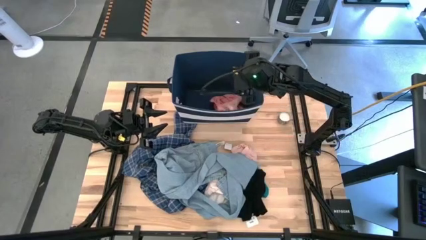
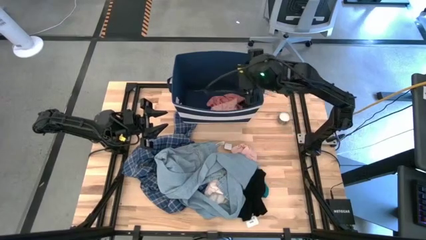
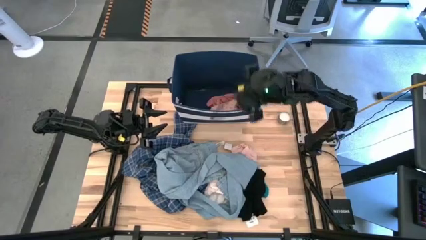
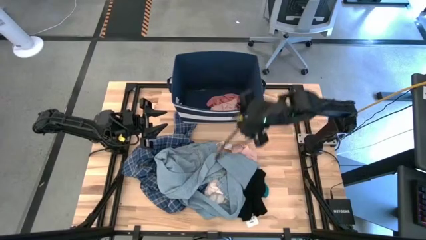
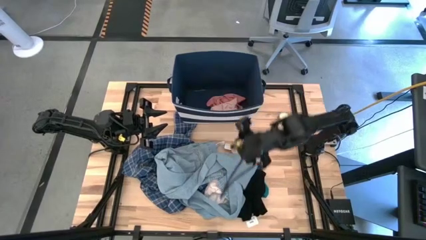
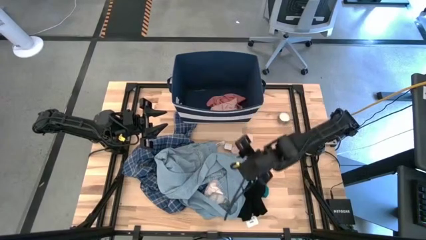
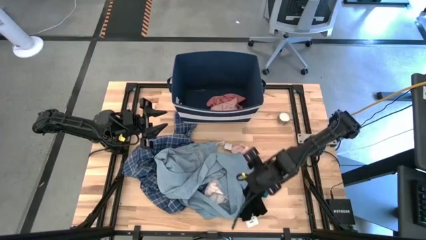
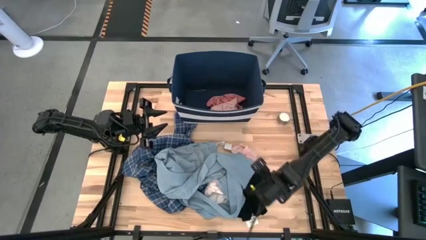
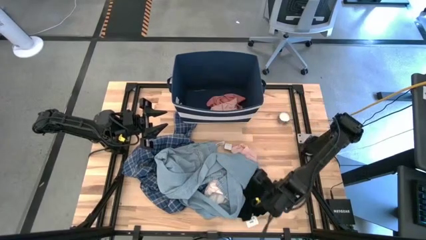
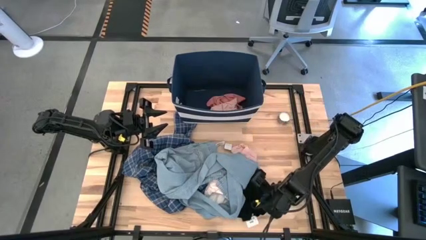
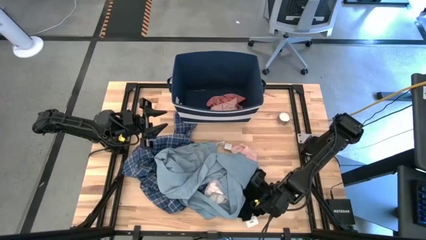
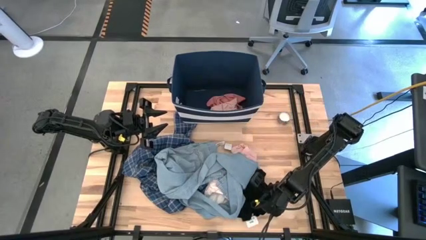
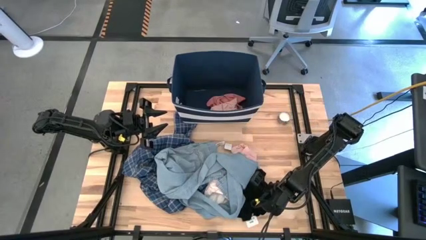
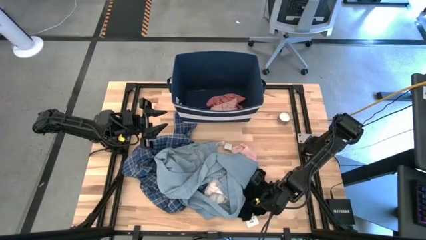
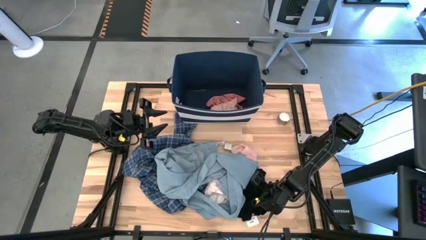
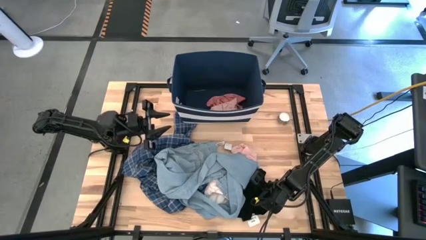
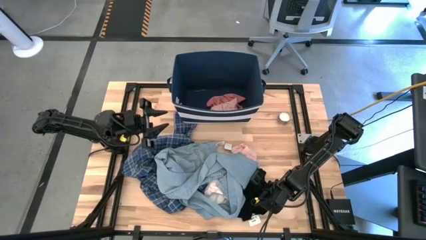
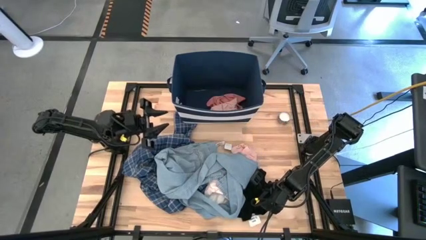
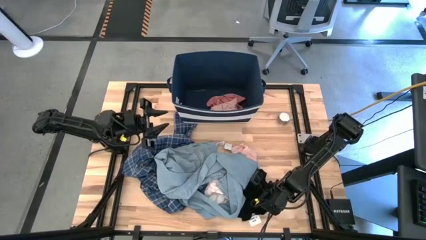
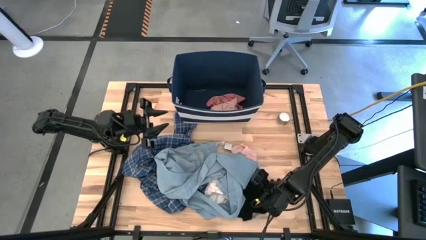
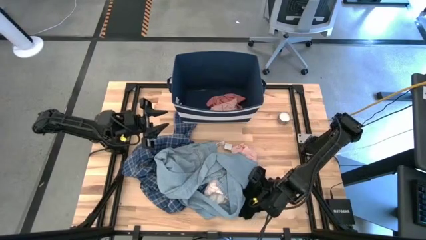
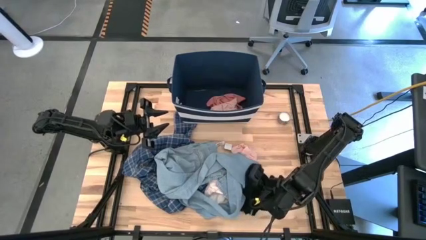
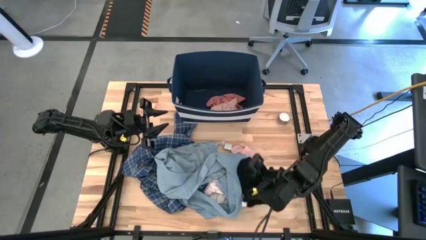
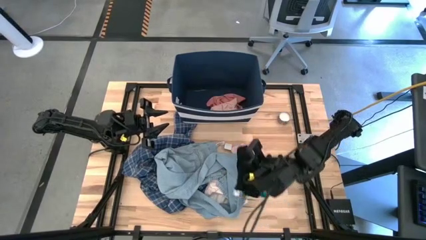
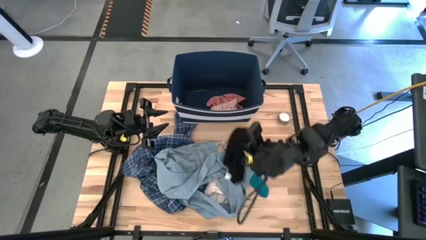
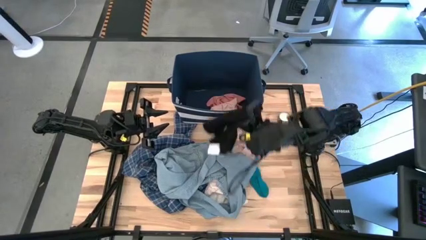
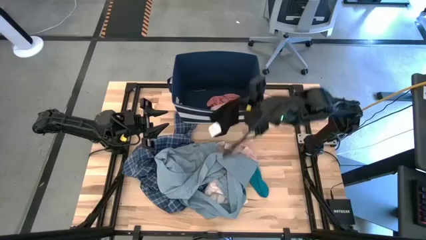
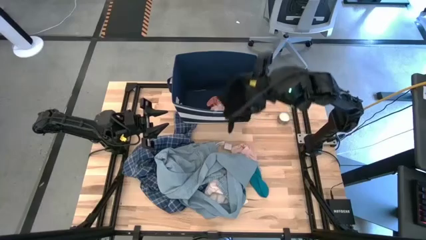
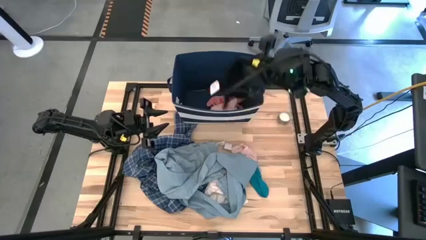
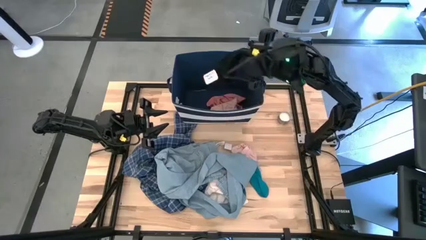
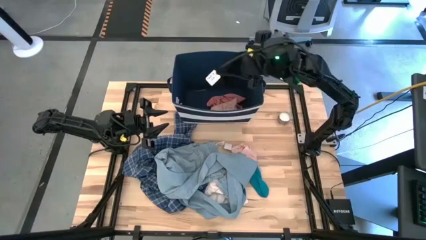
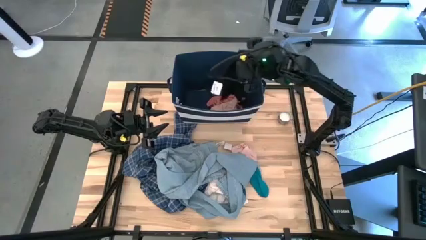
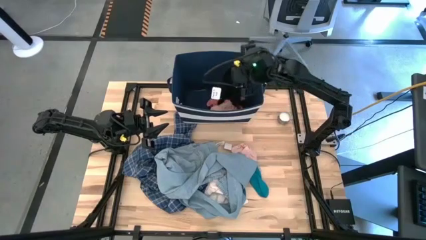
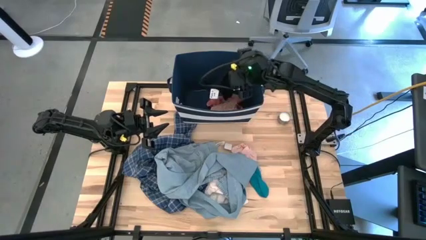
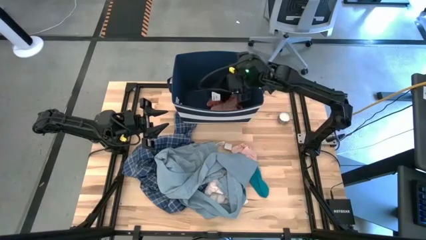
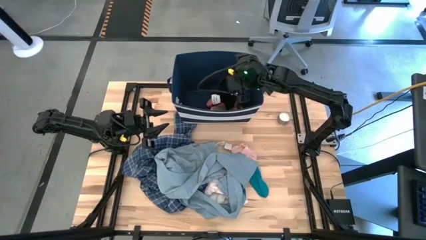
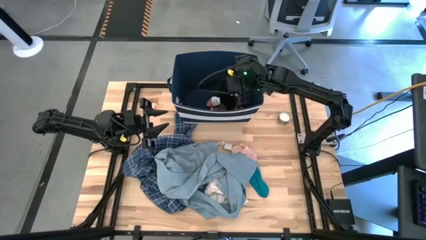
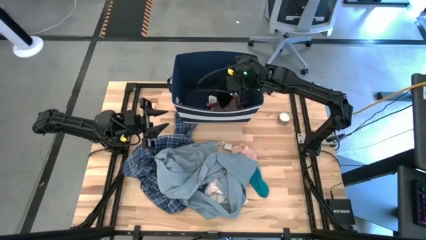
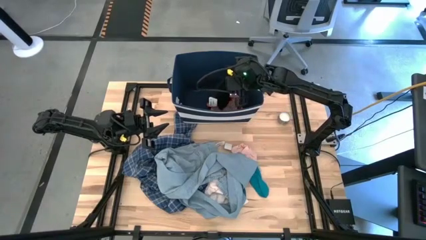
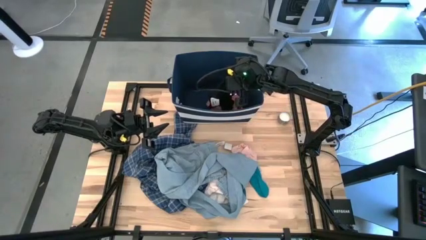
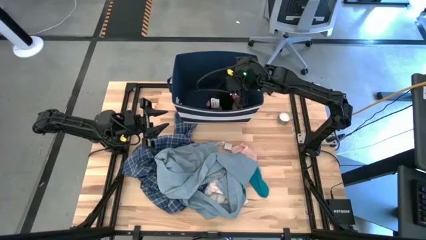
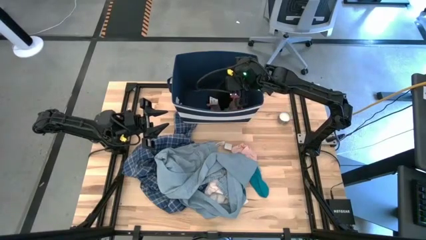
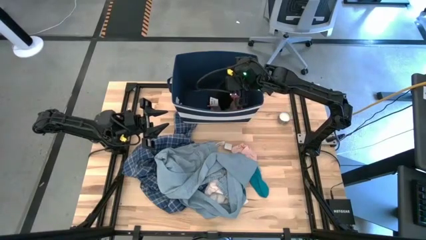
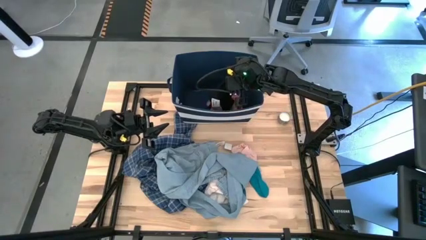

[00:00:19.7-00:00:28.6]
Task: Sort clothes
Put the black boxer into the blue laundry bin

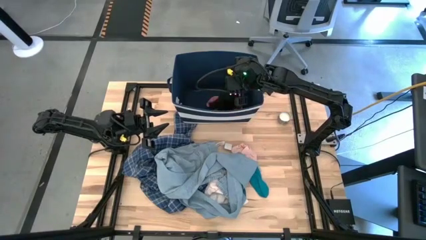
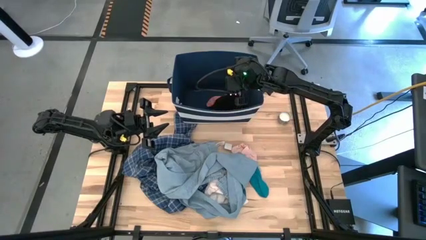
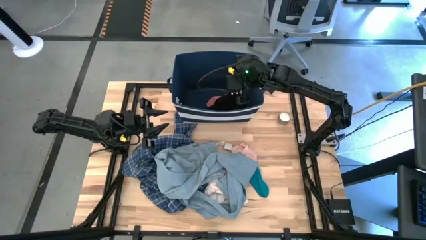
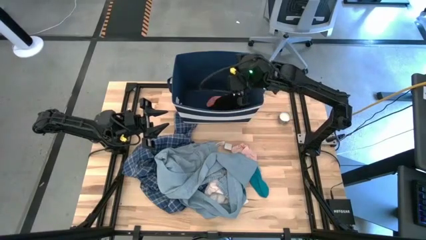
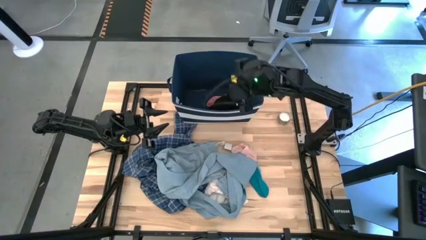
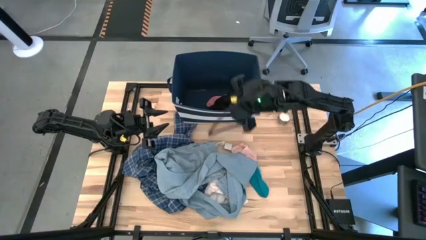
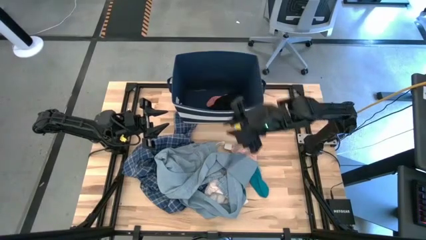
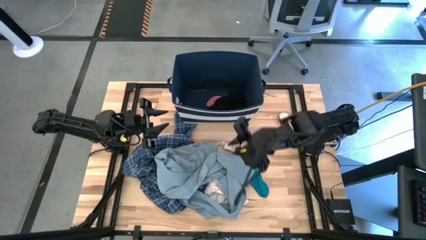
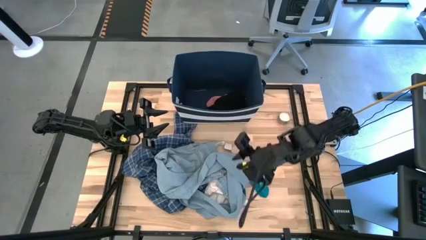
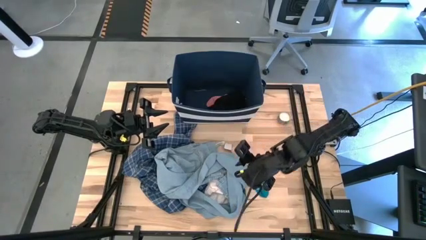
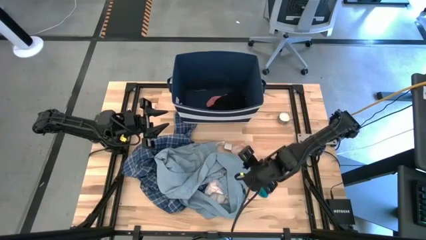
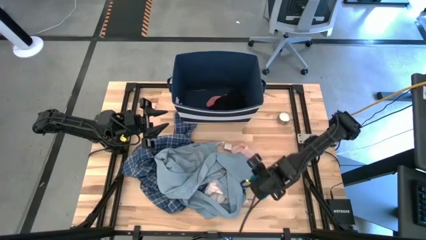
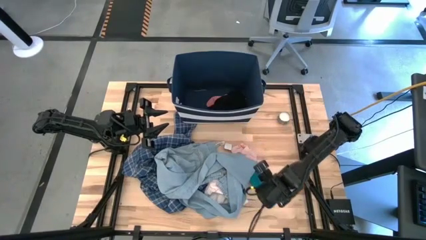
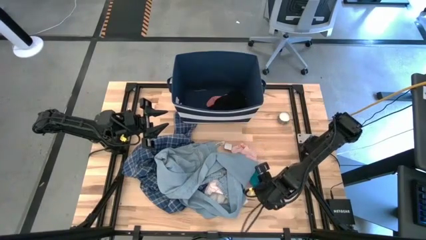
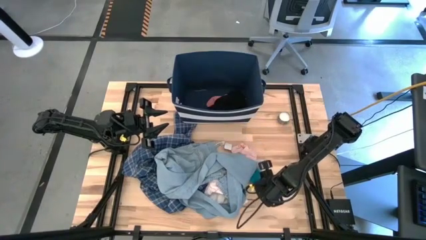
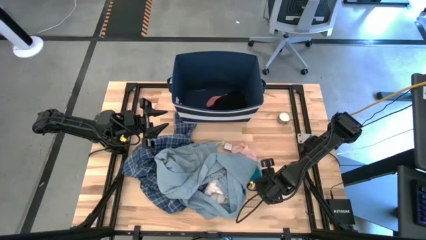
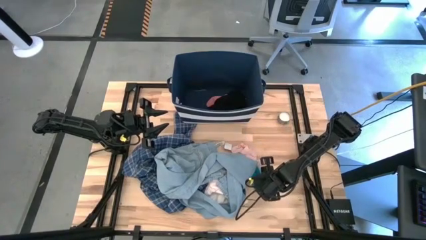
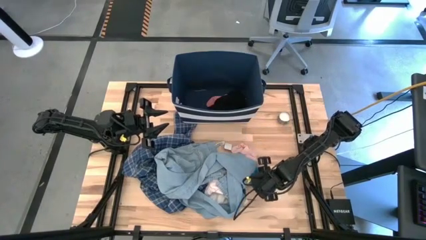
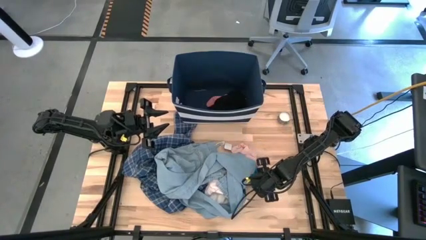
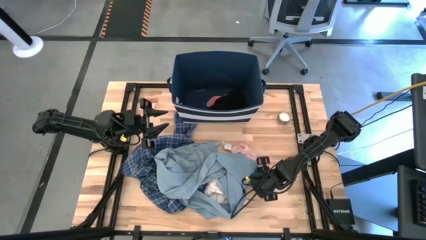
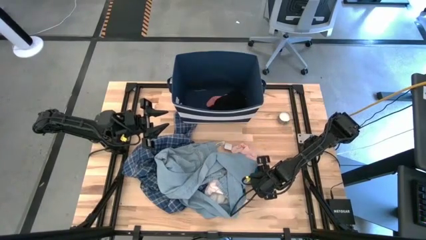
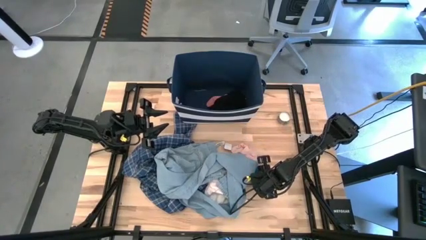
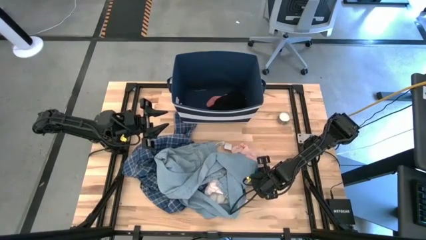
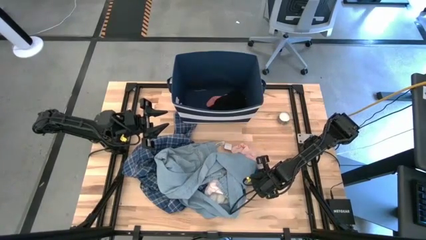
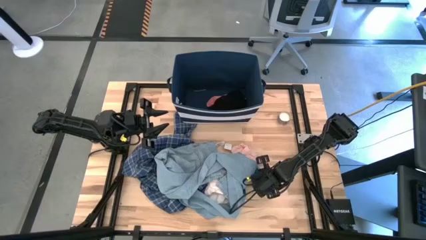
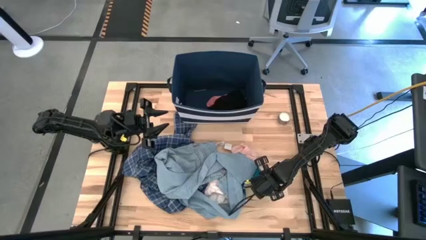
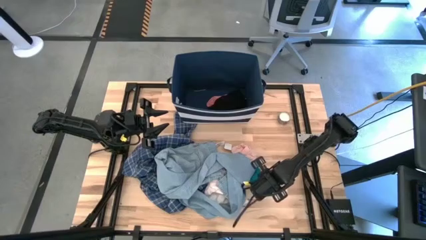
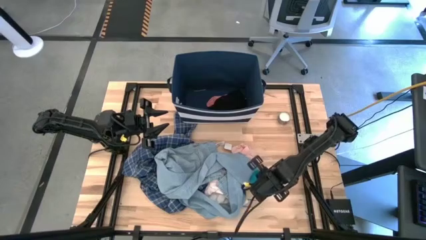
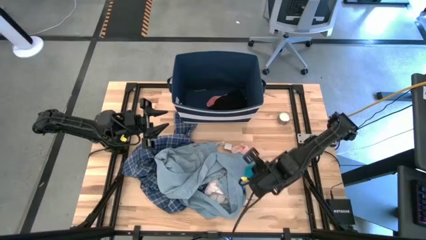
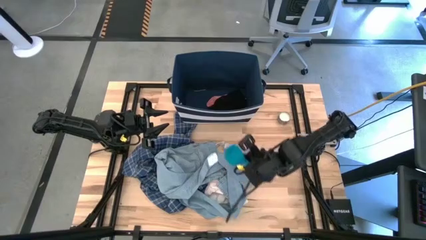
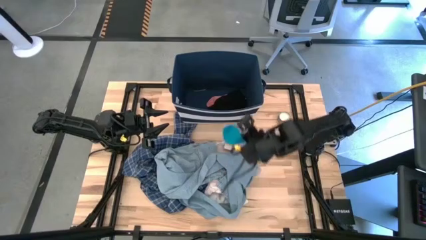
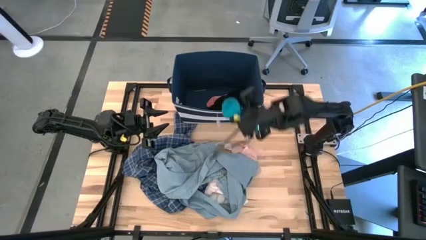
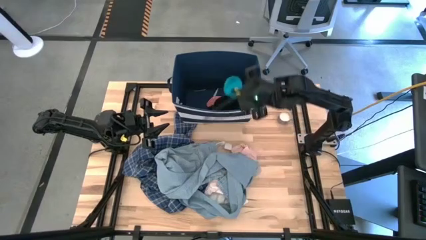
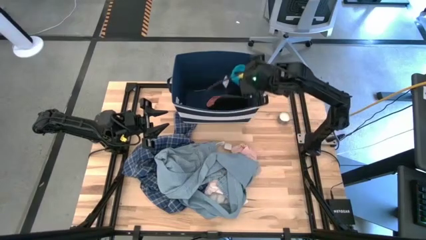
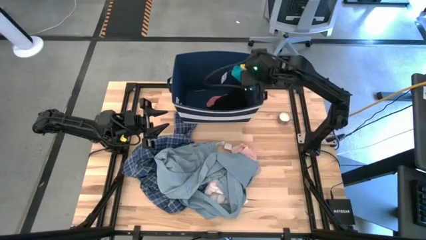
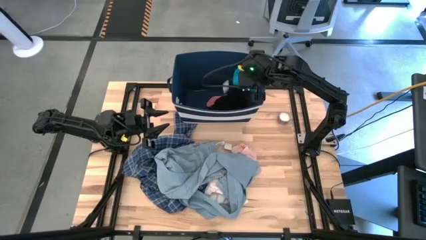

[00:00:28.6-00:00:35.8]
Put the blue sock into the blue laundry bin
